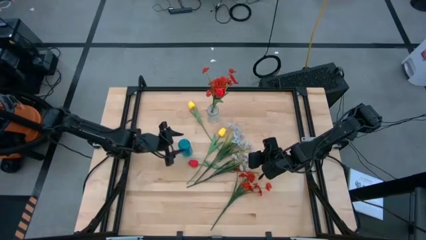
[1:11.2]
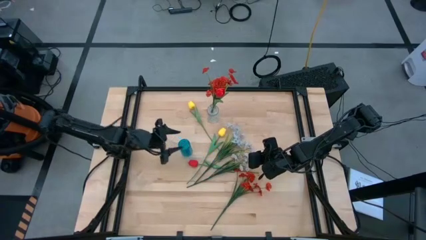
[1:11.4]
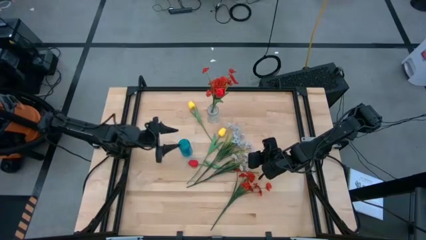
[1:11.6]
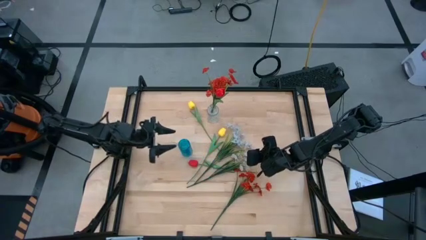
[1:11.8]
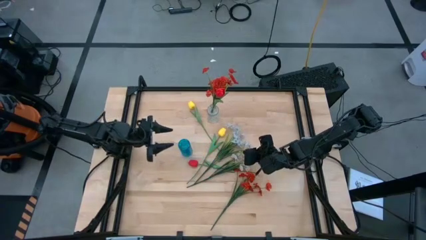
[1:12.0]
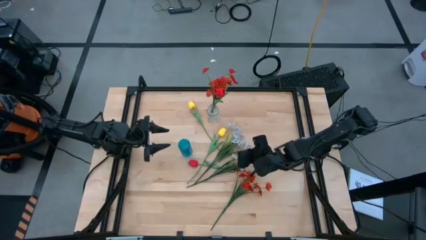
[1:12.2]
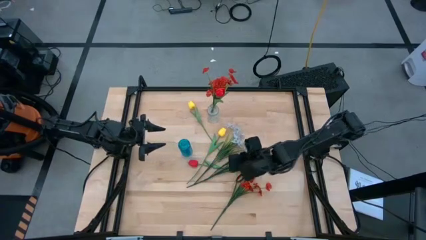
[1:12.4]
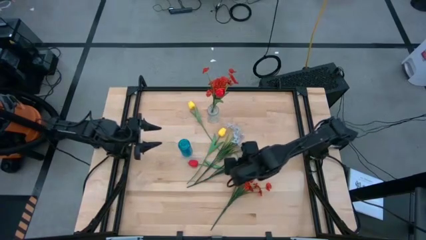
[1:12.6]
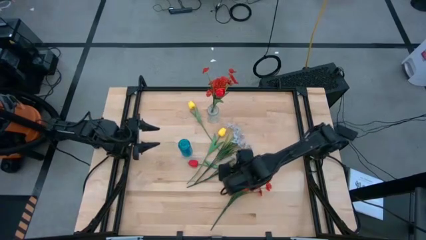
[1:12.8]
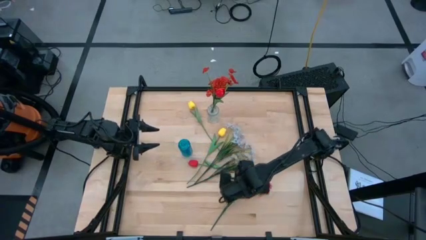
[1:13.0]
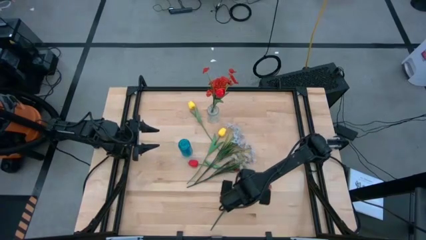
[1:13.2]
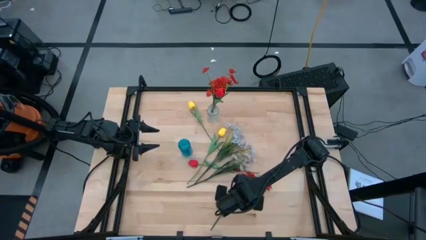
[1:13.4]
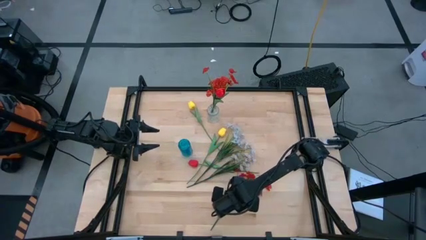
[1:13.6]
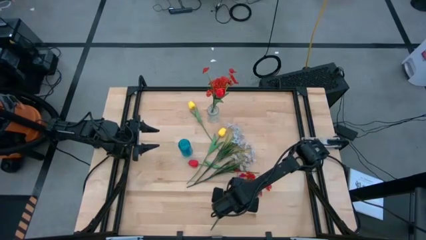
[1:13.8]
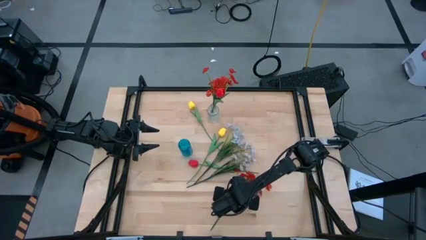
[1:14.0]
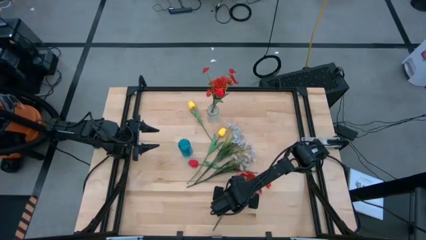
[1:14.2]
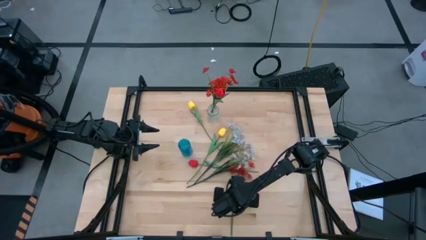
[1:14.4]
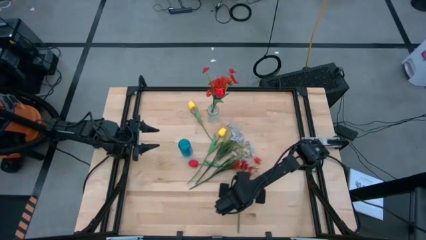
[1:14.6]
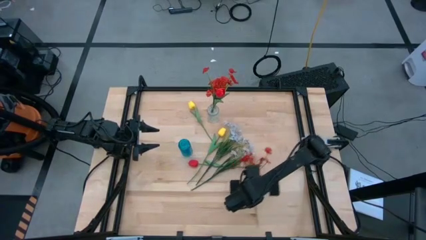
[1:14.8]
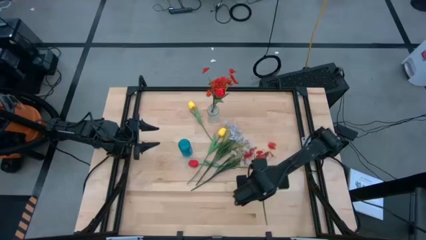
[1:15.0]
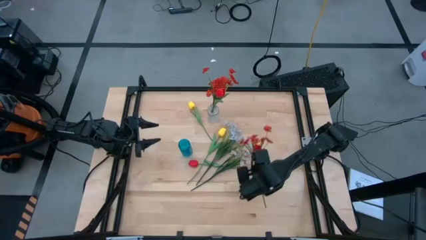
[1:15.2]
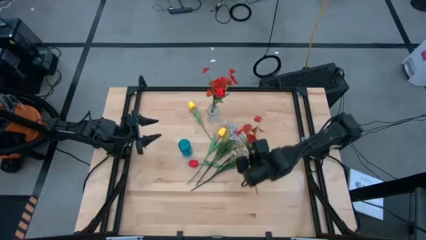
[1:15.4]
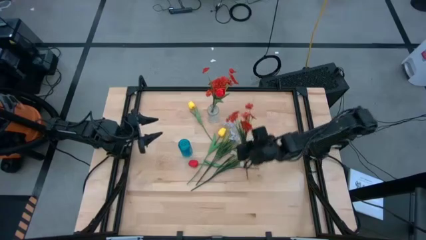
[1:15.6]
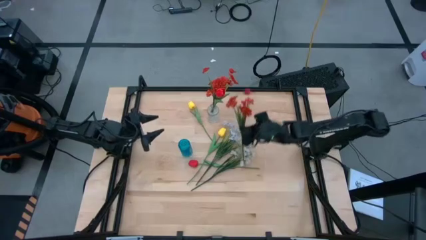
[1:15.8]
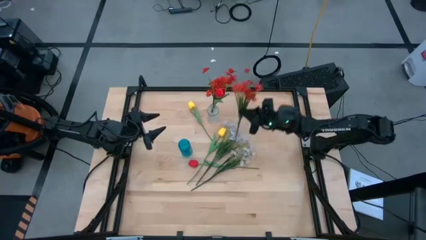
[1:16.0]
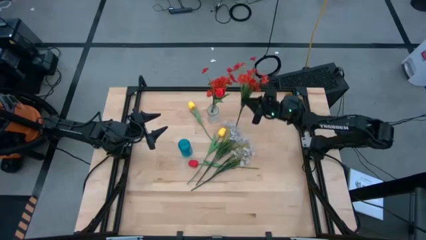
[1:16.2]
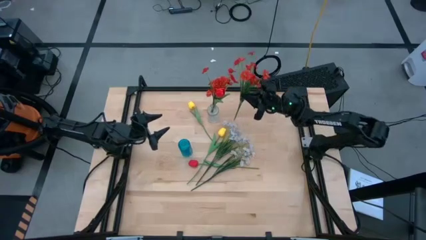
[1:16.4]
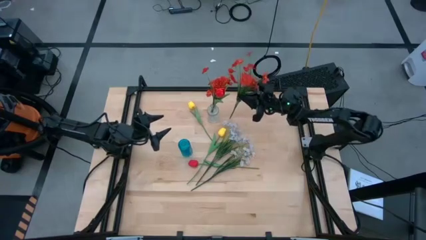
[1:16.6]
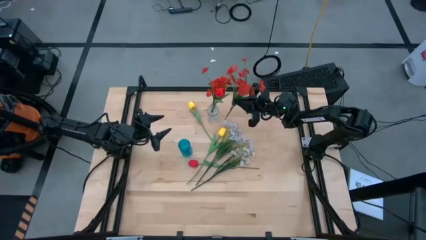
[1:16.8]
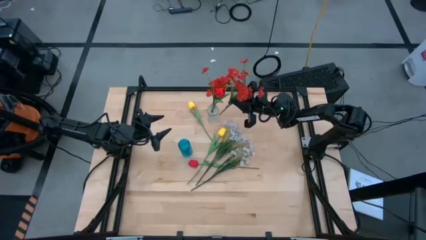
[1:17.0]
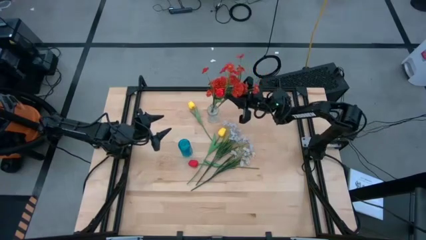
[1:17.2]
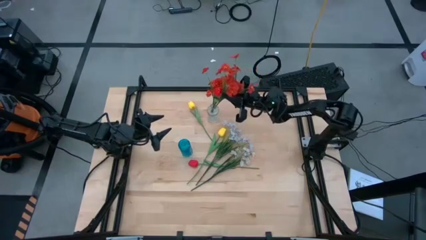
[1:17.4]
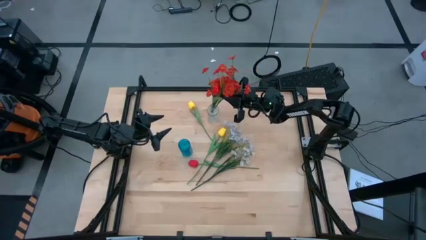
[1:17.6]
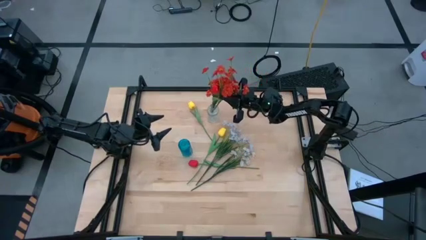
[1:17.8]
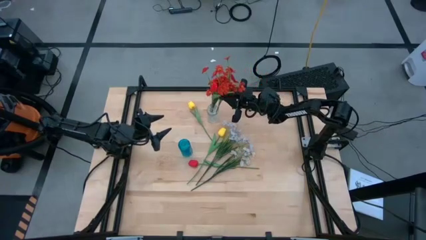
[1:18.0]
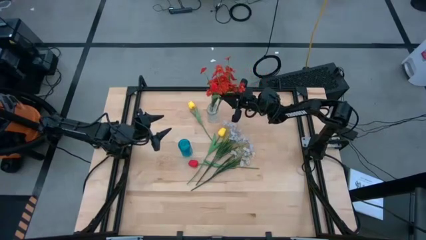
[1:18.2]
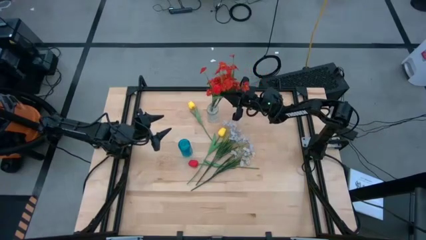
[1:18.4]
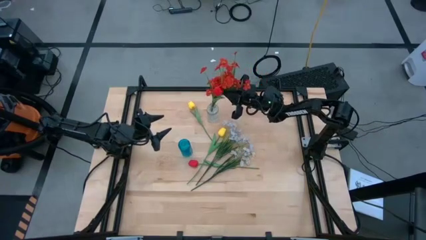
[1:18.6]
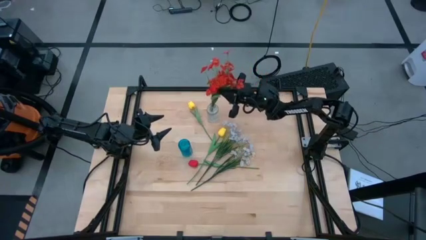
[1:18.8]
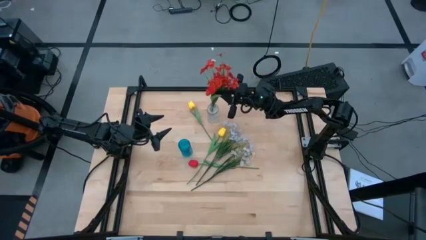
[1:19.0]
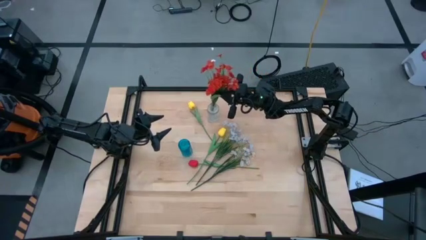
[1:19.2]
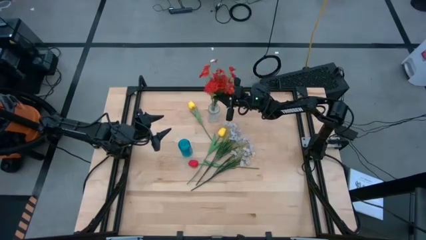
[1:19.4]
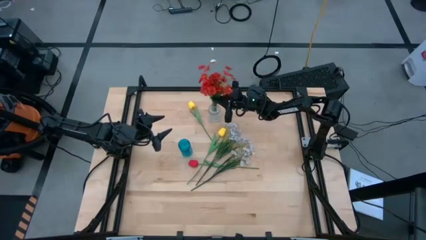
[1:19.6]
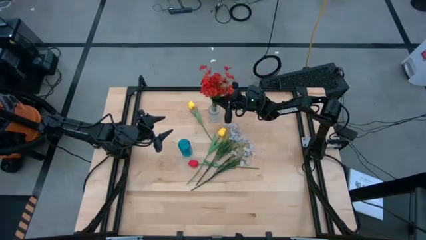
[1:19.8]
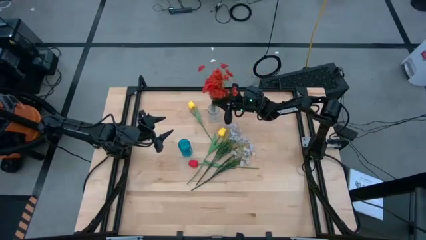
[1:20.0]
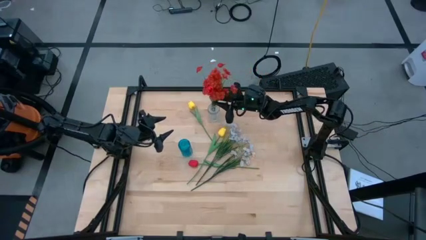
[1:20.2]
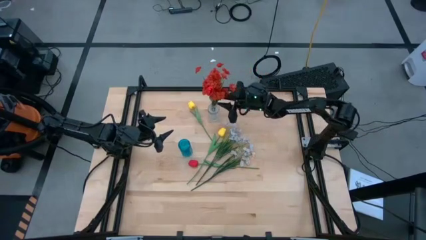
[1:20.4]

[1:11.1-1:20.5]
Task: Sort flowers into vase by color
Put the orange flowers into the transparent vase

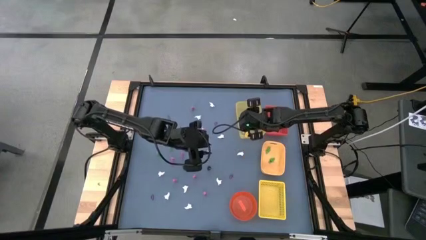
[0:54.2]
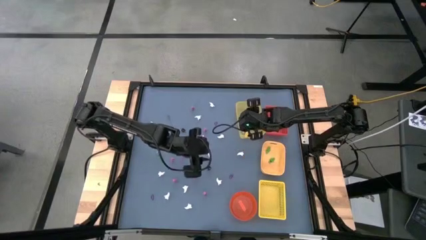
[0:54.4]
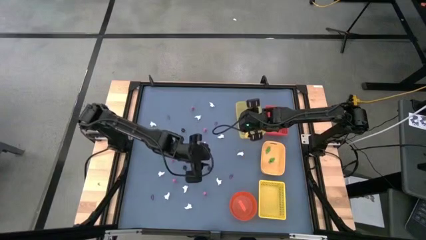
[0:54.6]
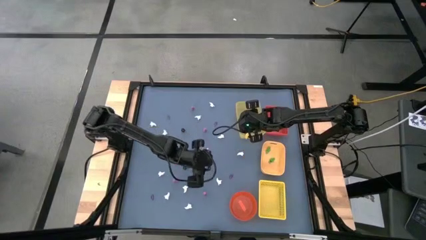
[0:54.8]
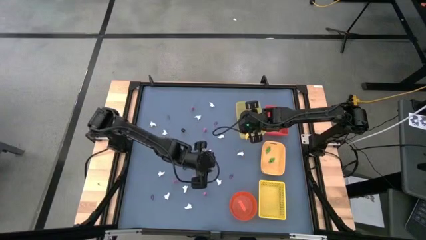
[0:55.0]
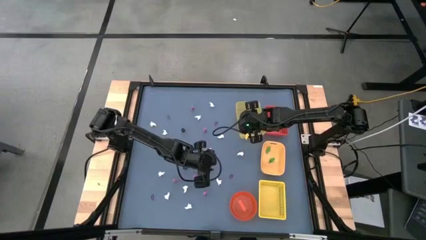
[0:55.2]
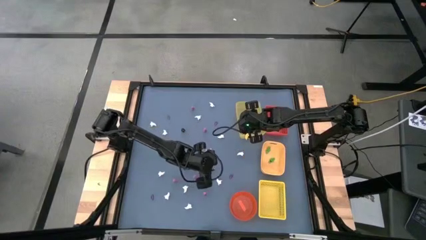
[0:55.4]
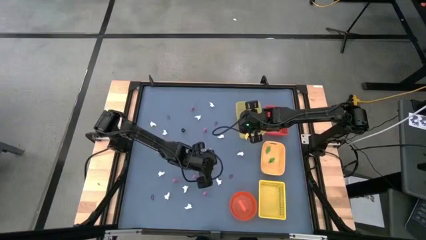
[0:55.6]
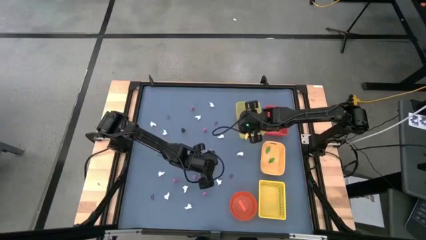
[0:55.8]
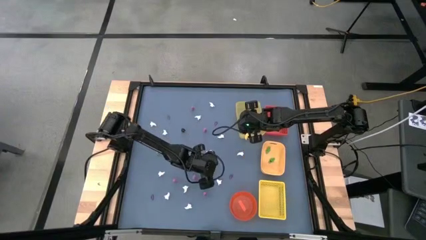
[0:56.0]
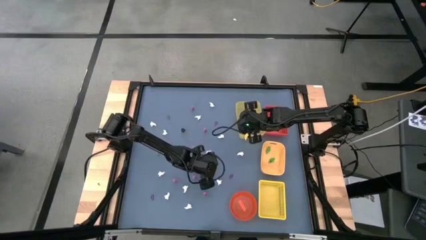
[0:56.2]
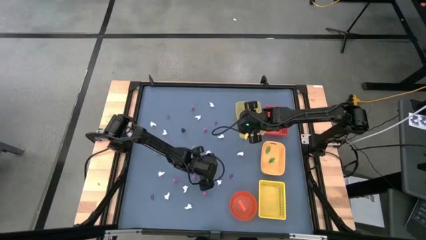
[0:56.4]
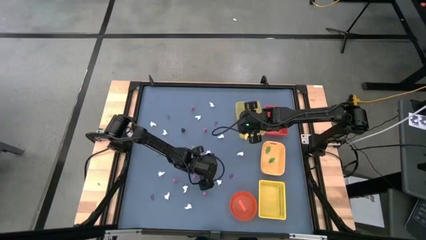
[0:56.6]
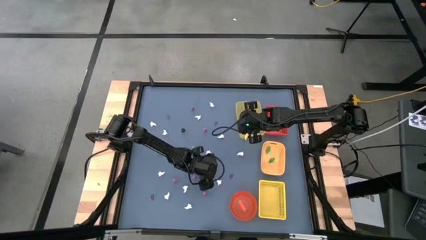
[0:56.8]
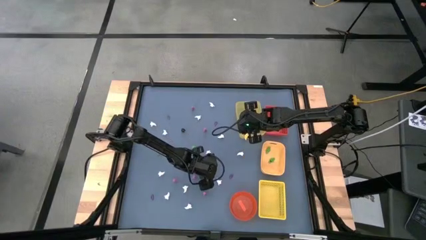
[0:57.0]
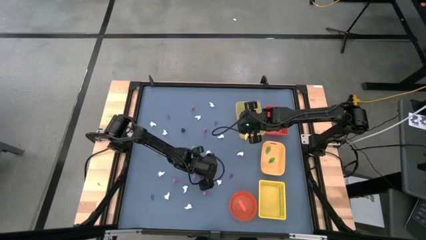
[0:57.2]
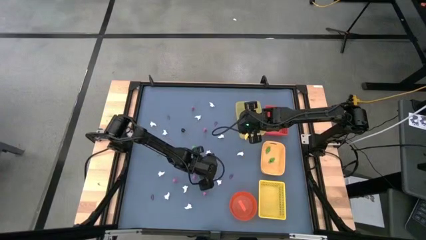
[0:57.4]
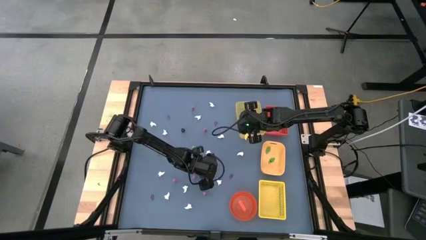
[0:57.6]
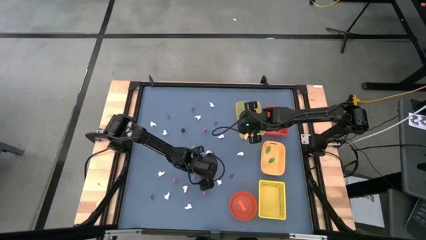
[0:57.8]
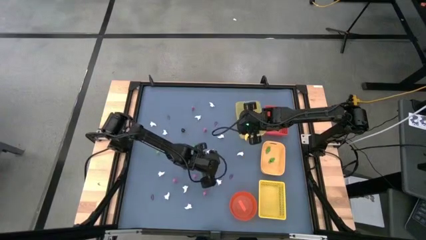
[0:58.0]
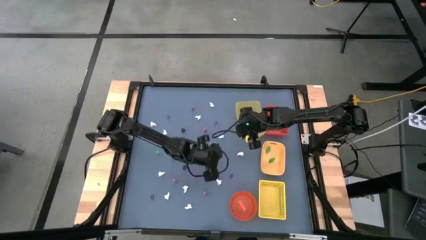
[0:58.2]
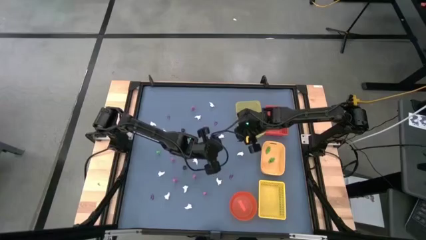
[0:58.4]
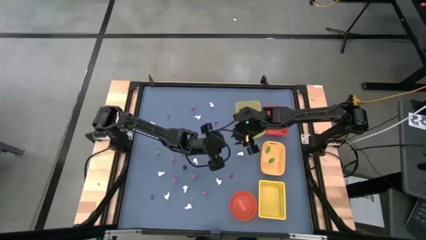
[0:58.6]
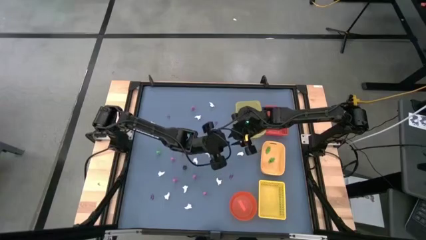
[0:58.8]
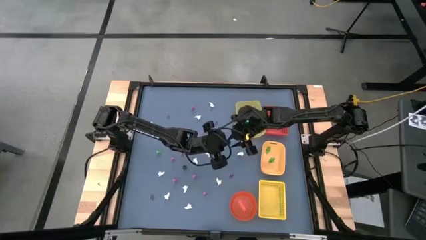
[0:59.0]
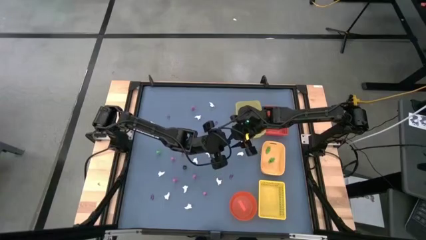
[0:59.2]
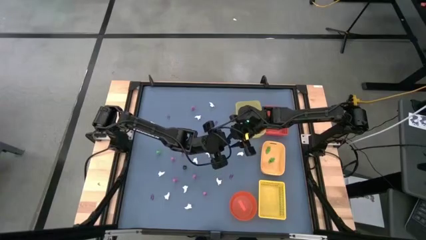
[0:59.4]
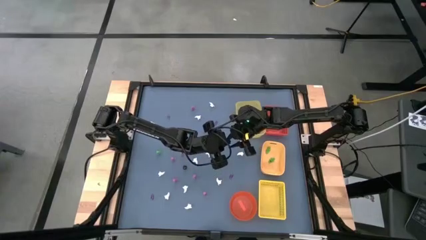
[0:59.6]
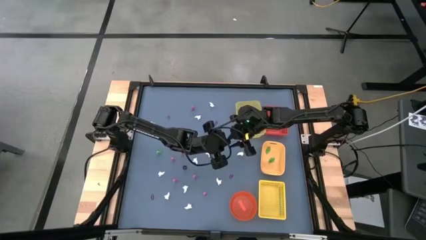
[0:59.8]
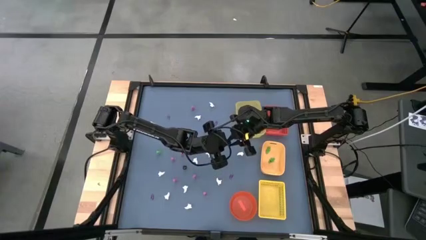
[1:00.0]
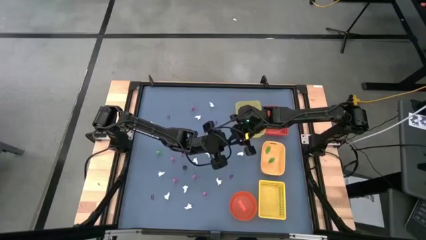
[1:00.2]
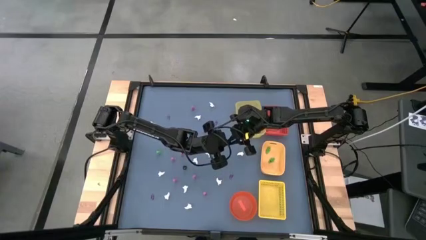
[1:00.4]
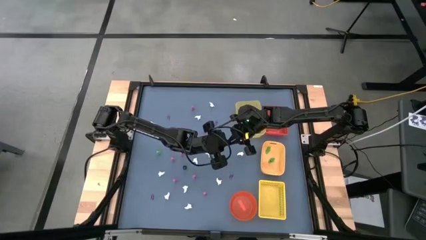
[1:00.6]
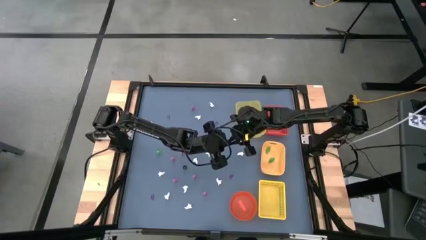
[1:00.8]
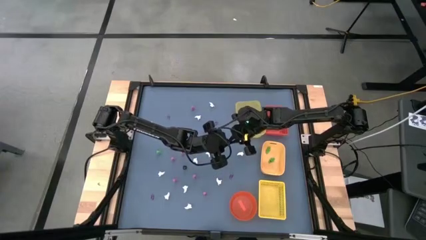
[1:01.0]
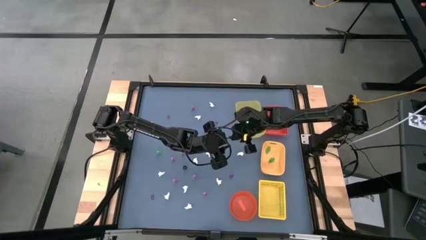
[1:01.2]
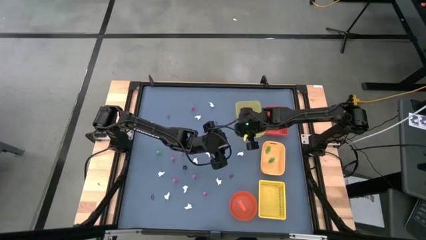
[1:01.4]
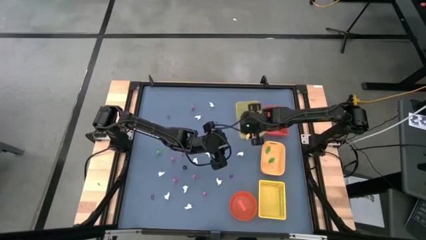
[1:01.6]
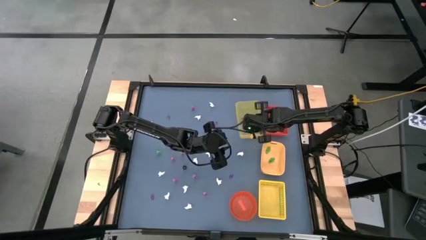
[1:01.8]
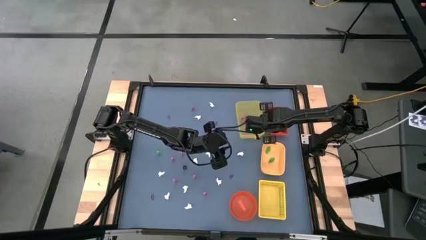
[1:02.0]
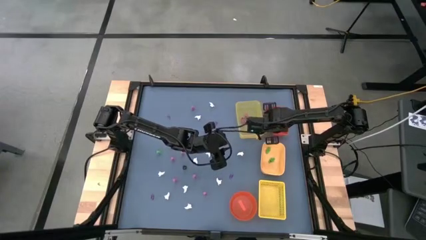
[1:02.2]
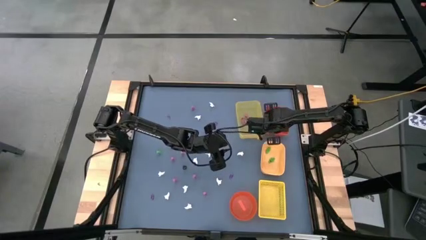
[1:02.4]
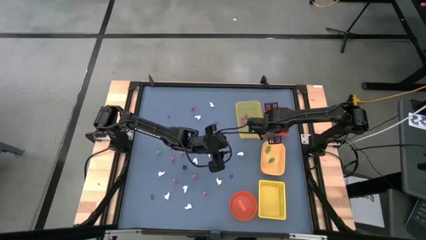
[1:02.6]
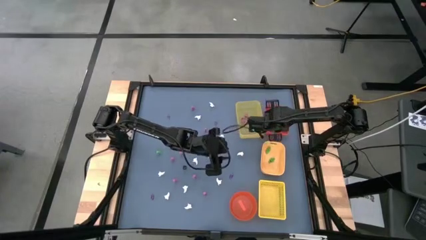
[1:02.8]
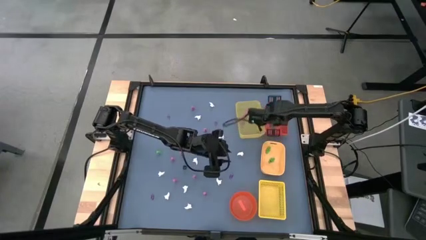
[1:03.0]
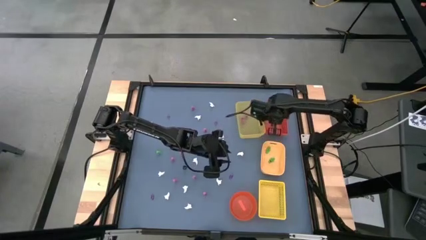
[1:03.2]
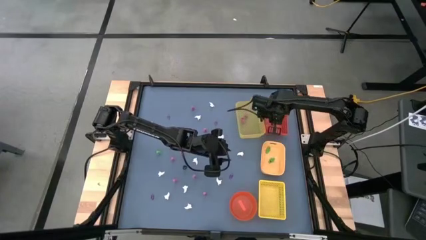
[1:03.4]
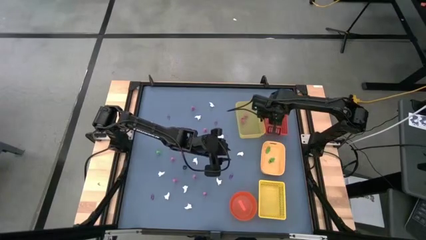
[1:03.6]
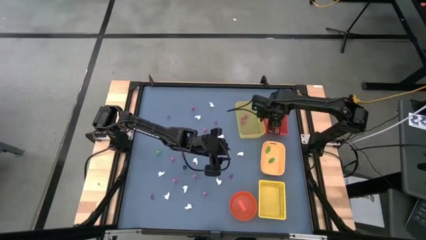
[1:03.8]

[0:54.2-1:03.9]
Task: Sort Halloween decoration
Put the black skeleton toy into the red box
